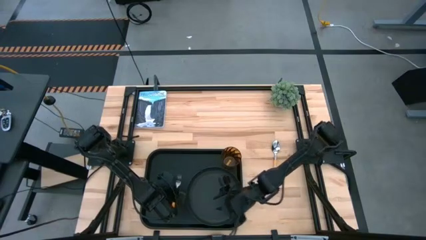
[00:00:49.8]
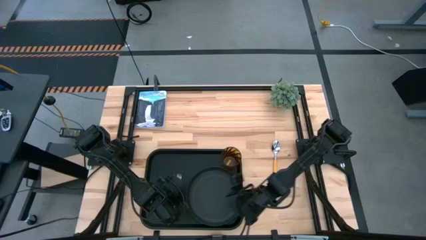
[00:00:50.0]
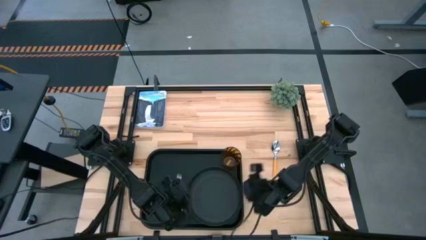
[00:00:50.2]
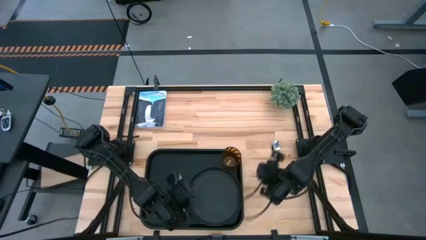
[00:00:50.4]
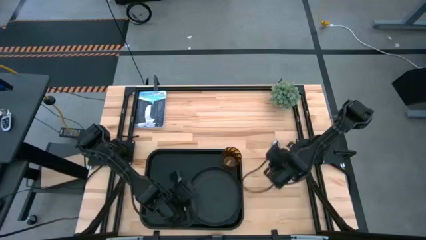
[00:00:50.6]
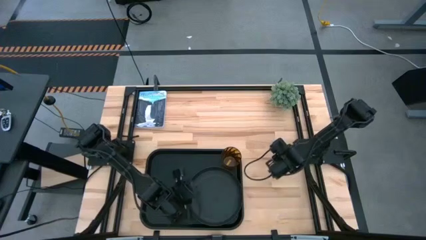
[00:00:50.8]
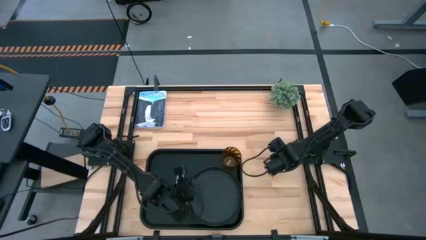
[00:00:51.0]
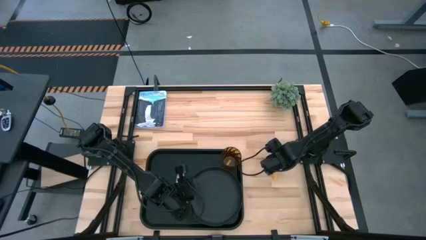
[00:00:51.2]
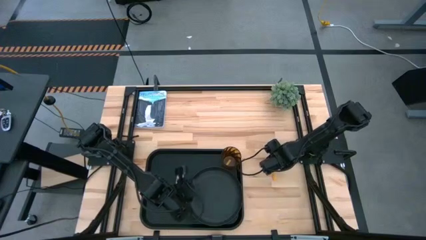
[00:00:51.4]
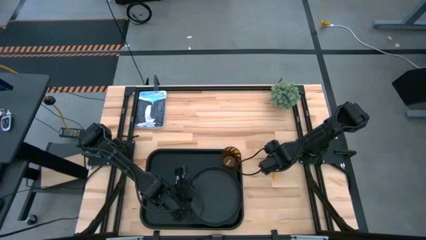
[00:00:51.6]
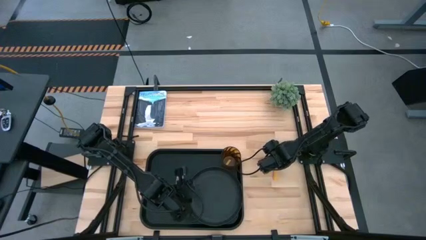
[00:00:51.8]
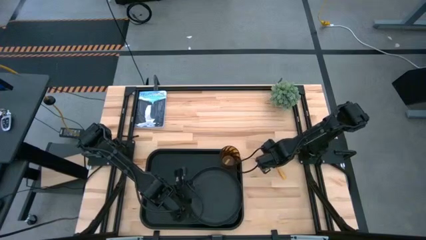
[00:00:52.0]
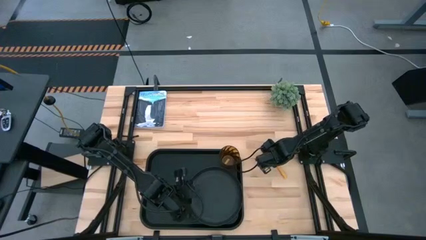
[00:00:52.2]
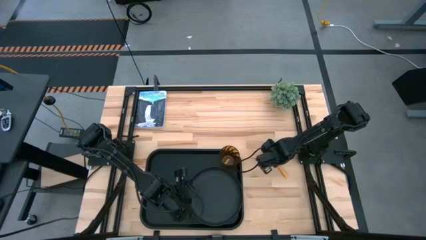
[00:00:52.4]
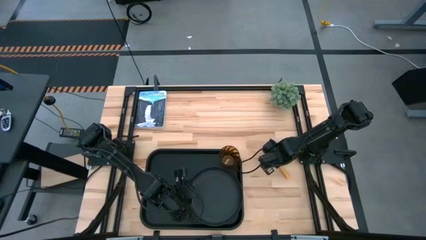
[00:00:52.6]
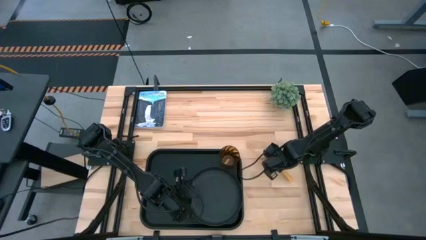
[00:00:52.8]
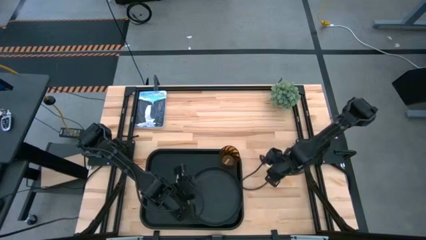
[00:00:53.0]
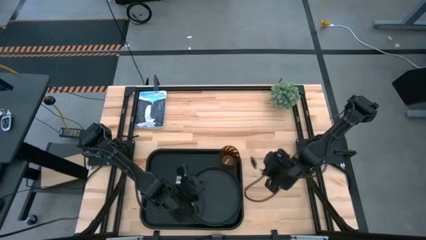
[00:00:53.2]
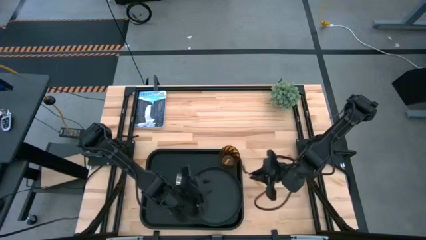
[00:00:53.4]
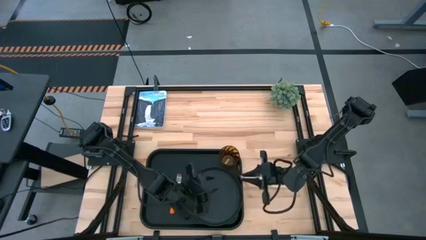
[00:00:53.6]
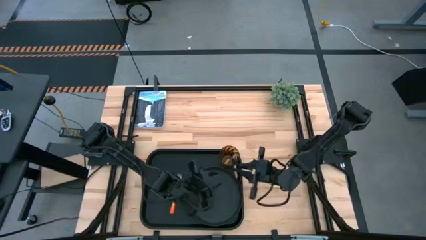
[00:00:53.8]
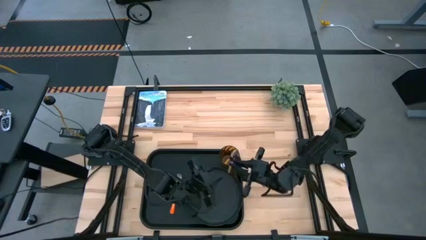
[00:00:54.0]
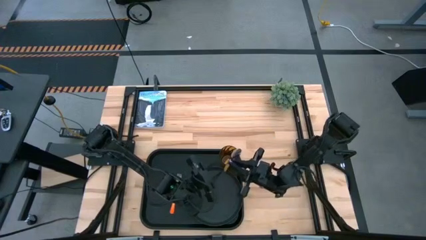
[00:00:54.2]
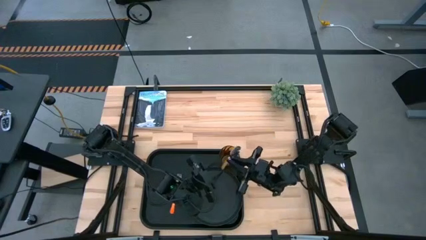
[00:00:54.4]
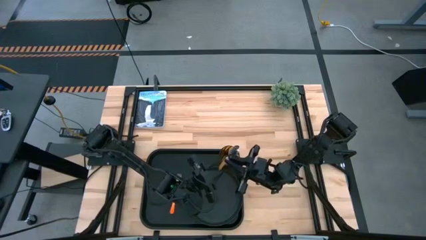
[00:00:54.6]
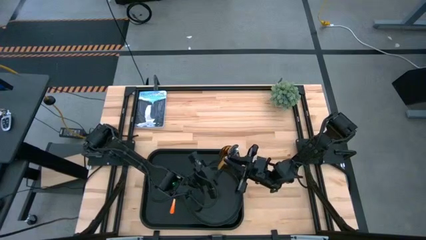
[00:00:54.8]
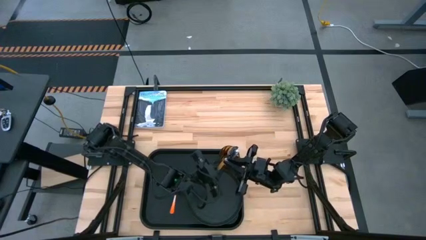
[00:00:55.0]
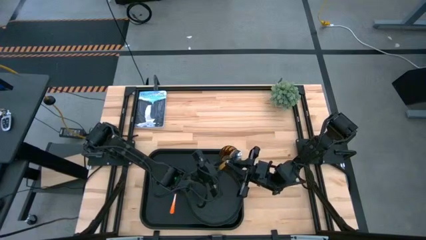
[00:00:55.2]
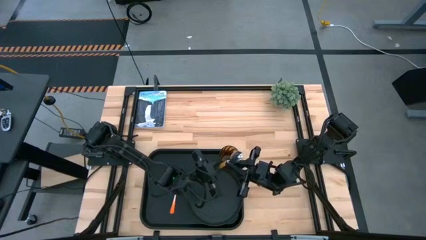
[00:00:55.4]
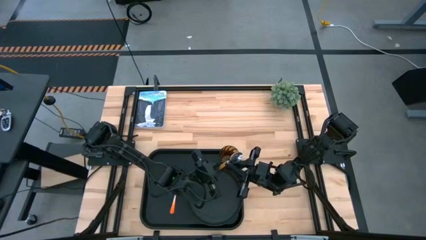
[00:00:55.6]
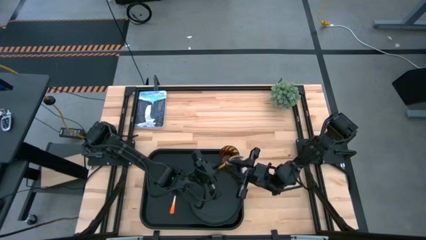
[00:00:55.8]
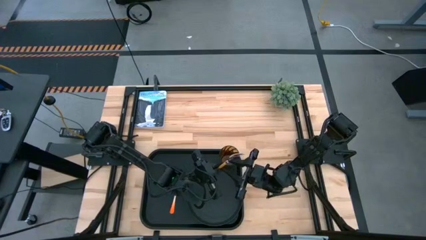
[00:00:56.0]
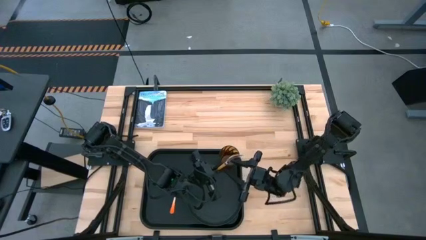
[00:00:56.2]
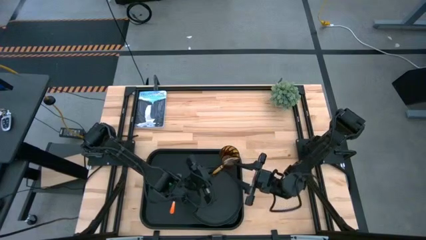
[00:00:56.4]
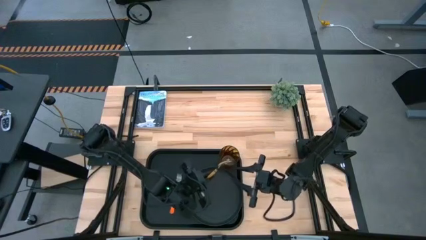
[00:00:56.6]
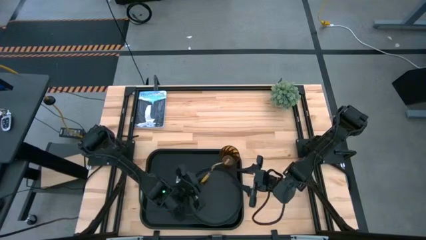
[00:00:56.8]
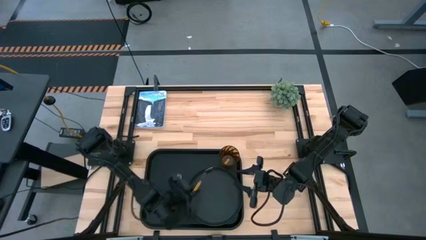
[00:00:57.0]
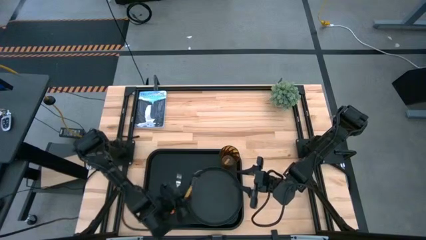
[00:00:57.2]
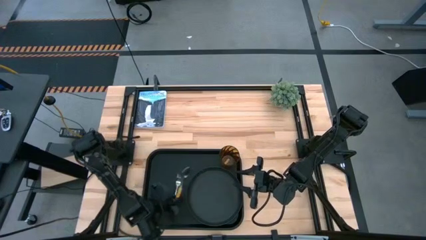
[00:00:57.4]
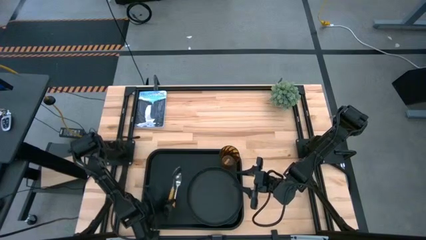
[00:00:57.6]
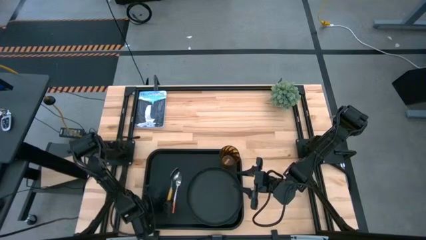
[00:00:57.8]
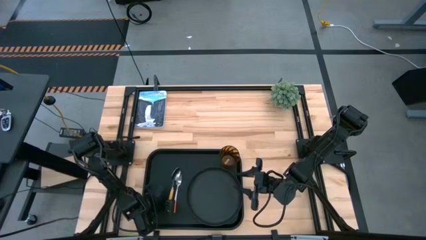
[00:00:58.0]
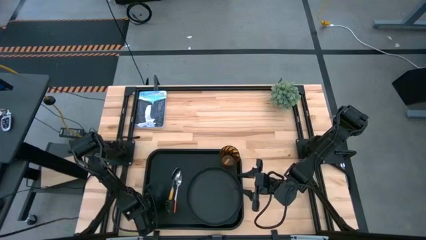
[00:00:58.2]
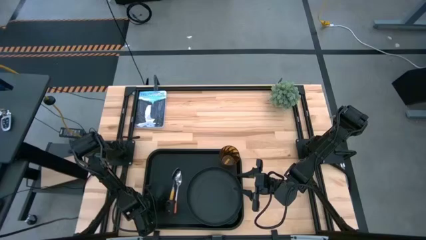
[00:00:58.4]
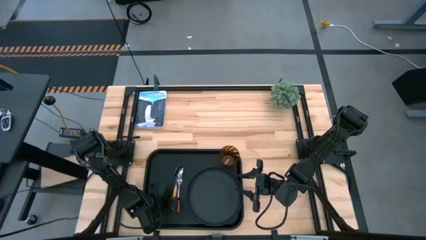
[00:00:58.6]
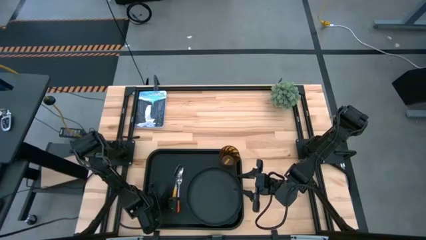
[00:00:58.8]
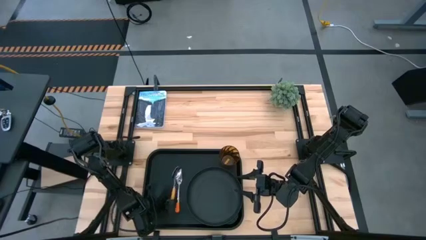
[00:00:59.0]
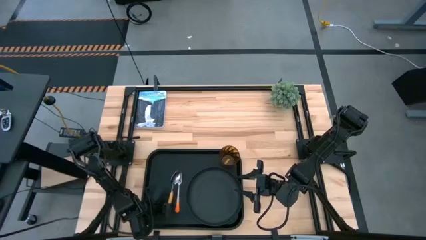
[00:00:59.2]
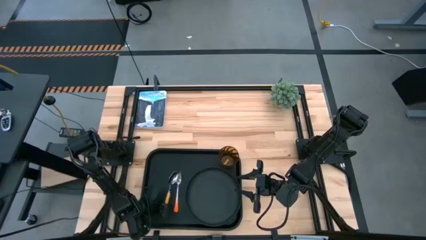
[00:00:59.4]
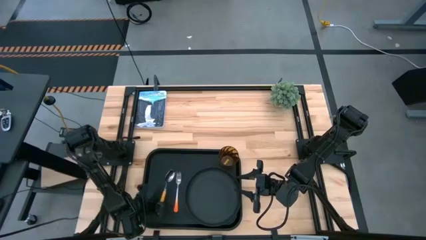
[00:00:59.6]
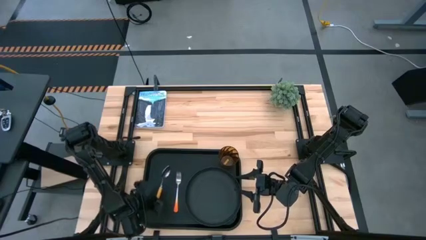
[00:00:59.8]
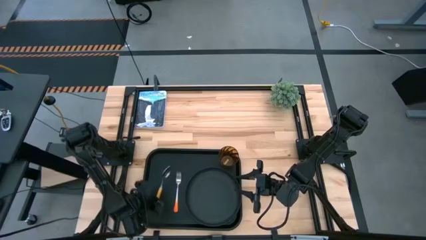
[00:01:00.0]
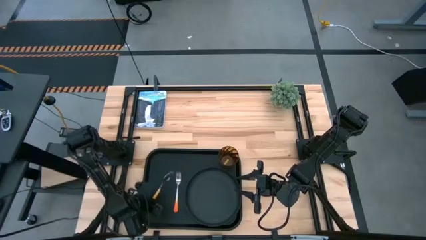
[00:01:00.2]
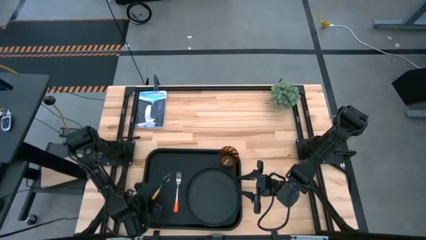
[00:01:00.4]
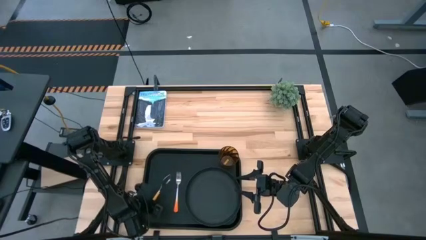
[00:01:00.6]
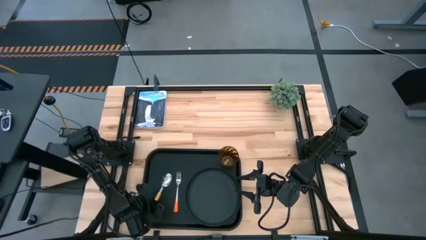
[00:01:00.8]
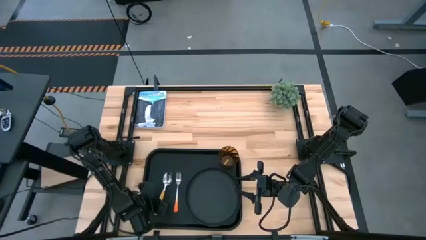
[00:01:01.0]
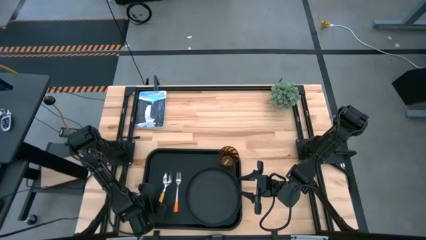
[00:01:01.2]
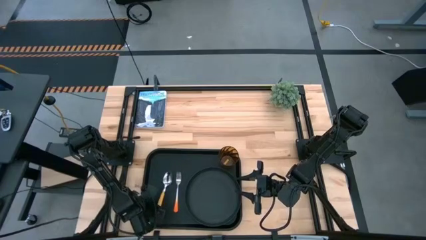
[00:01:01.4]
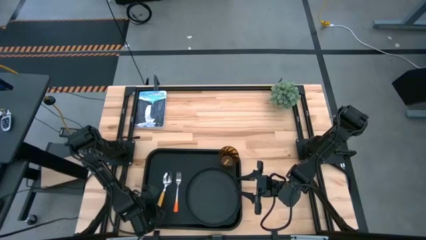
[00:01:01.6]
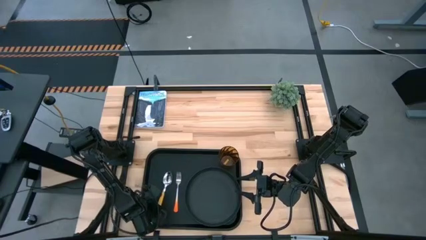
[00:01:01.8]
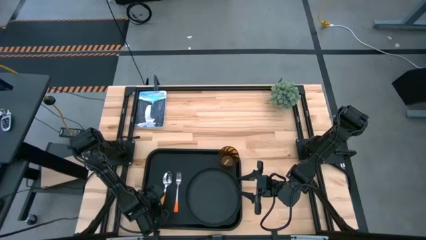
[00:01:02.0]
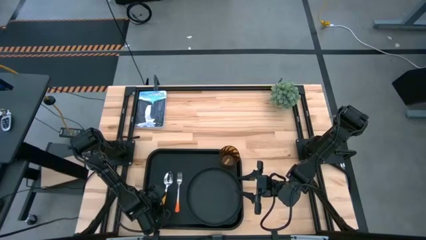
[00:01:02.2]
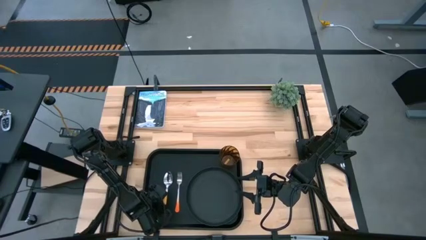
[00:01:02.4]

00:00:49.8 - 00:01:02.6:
Task: Pick and place plate/cup/fork/spoon on tray
Put the orange spoon beside the fork on the black tray

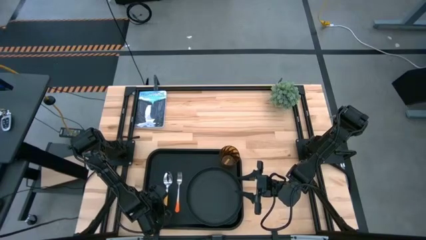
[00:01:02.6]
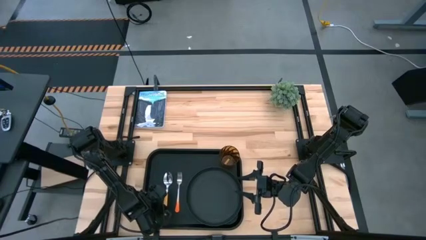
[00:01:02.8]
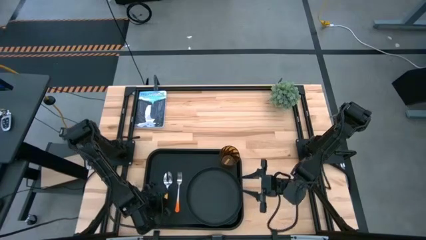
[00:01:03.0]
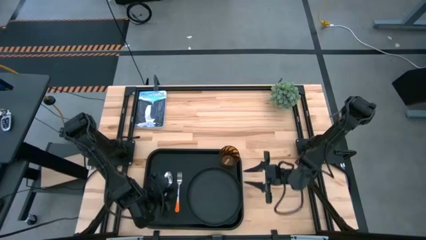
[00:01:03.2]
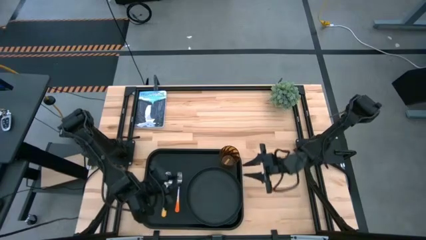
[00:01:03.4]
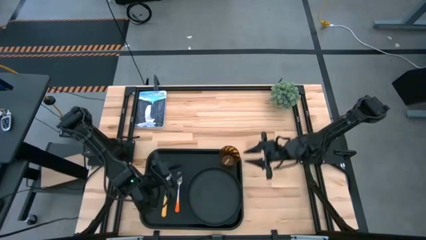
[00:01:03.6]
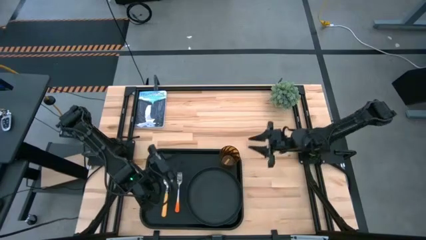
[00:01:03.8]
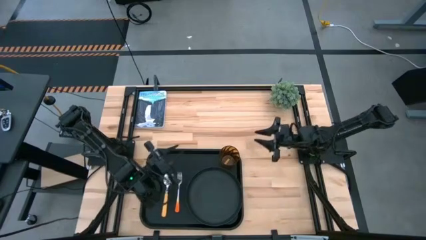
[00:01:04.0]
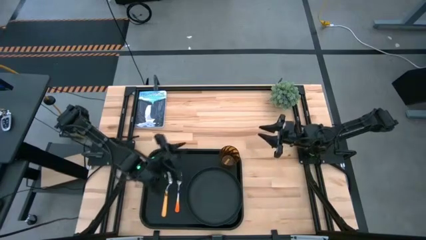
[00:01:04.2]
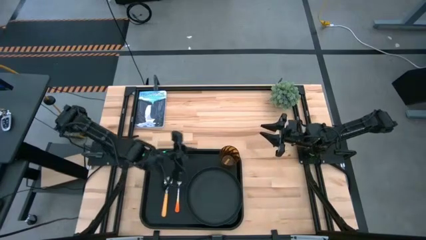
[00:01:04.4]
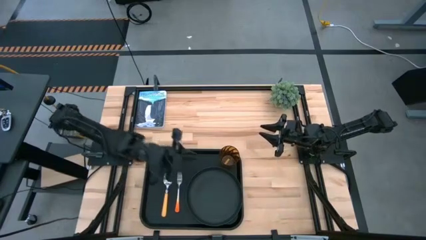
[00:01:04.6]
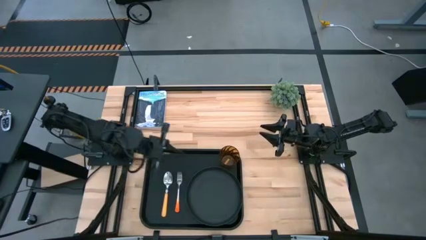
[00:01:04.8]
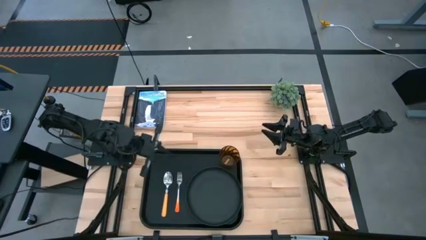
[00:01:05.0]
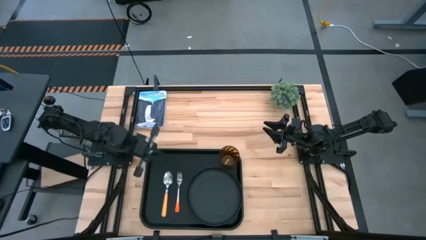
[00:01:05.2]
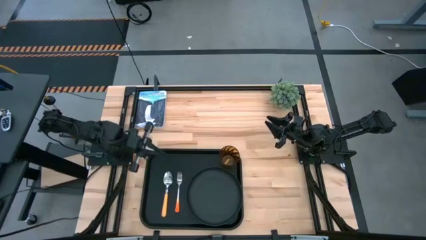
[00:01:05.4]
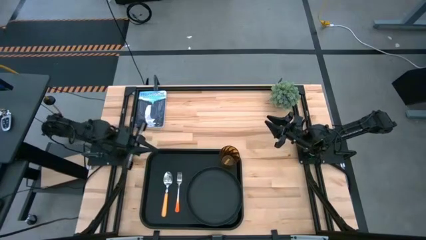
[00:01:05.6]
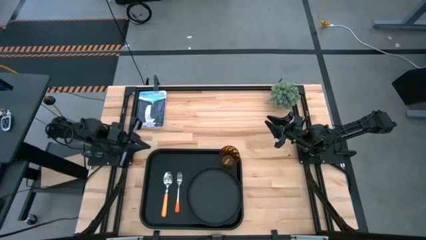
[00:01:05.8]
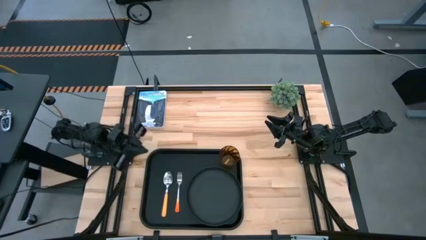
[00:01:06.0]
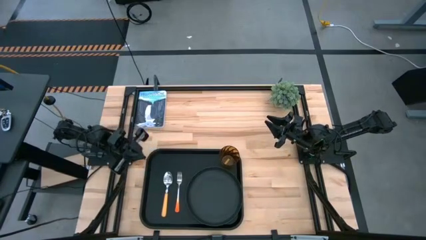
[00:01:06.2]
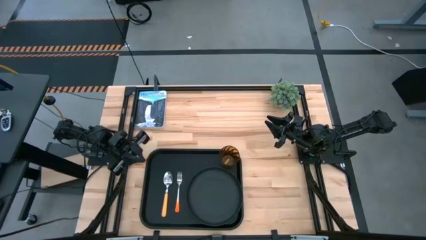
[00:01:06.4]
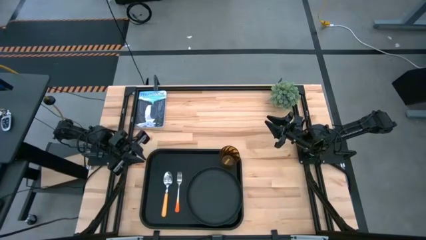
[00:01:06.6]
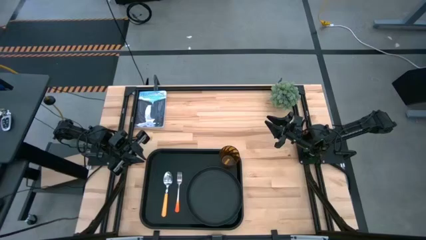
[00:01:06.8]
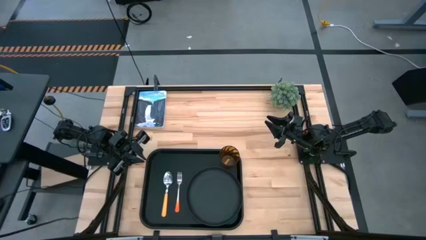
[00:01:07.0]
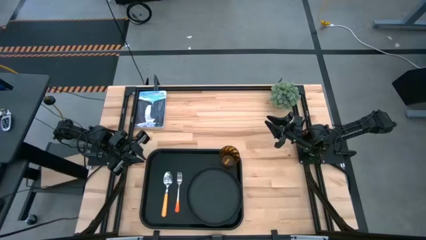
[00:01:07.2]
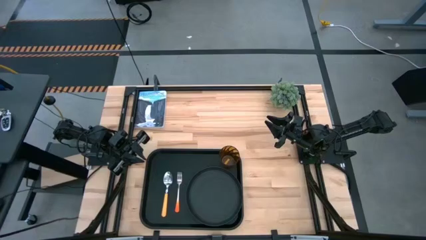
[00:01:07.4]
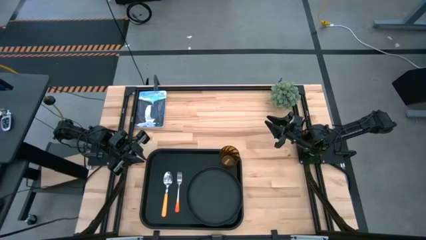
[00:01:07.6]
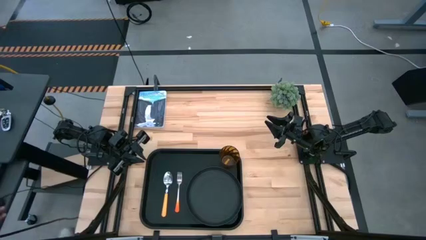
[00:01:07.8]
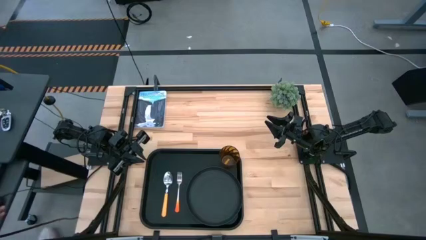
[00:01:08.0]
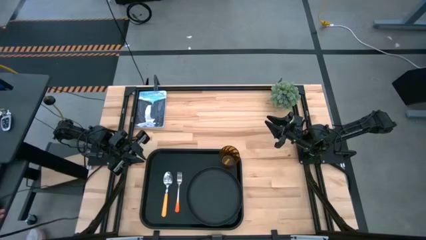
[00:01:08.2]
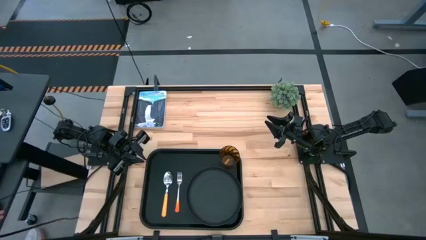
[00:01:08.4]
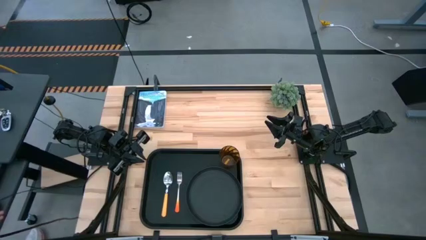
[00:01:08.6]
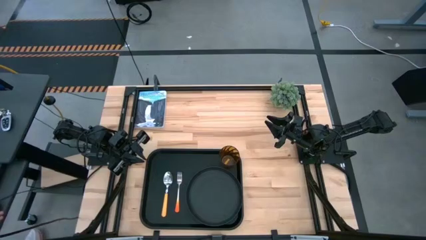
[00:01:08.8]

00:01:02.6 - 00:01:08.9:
Return to Home Position
